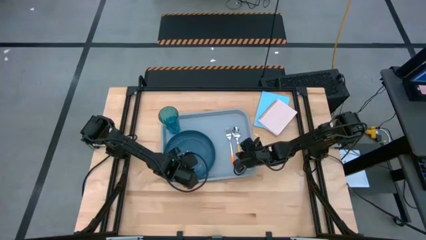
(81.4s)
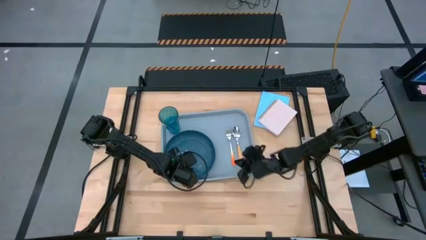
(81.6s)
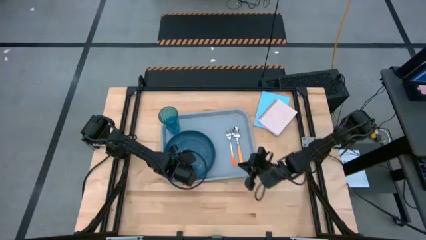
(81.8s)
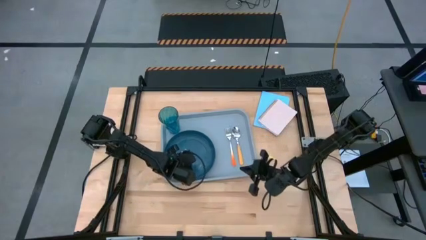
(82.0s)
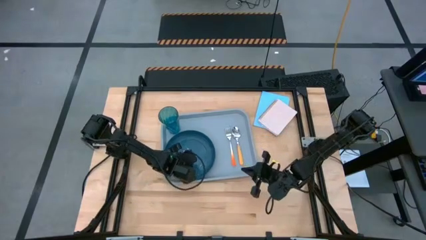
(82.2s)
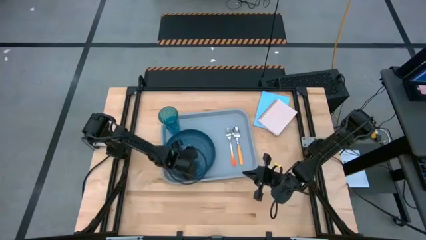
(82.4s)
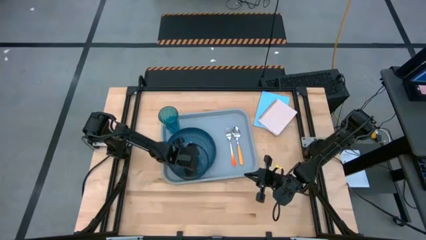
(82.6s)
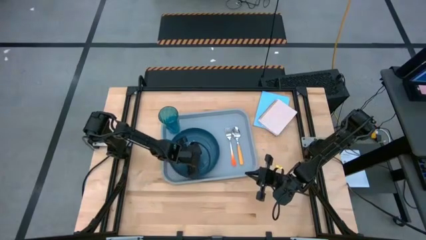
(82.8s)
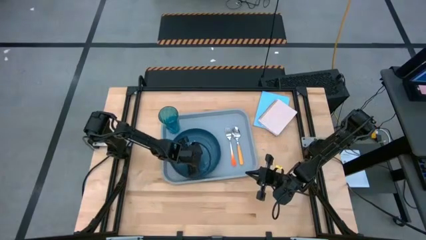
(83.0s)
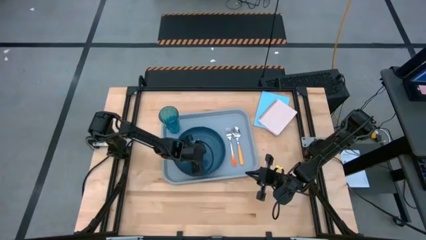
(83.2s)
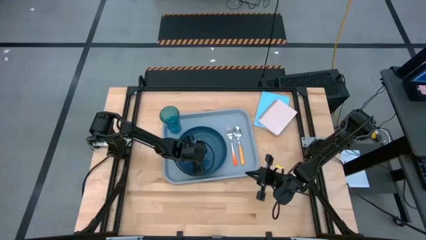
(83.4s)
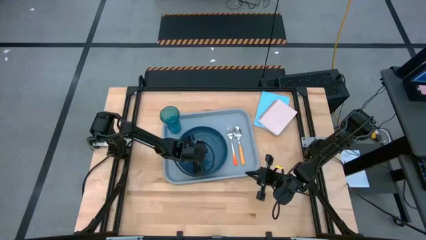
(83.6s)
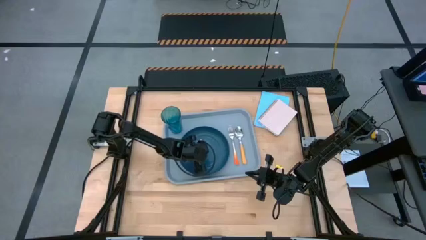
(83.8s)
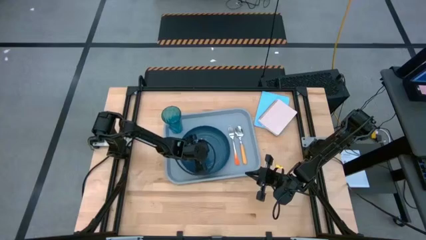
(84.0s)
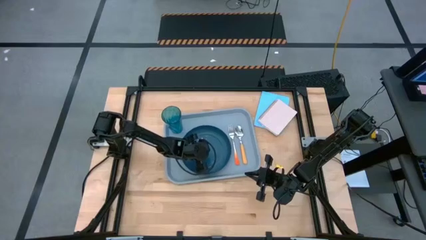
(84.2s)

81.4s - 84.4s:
Task: Pick and place plate/cup/fork/spoon on tray
Adjust the blue plate on the gray serving tray

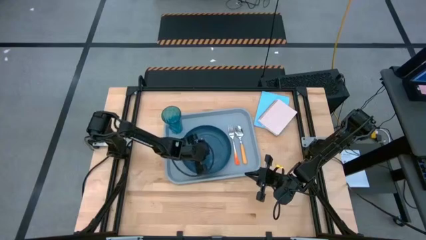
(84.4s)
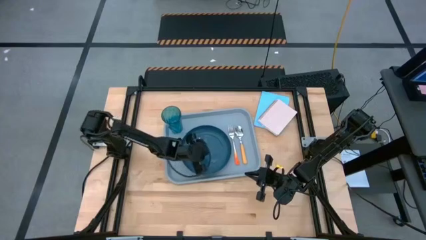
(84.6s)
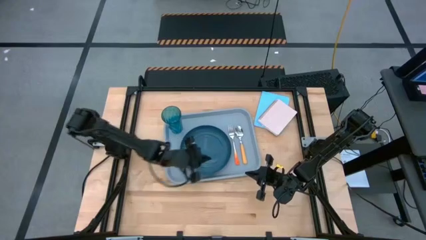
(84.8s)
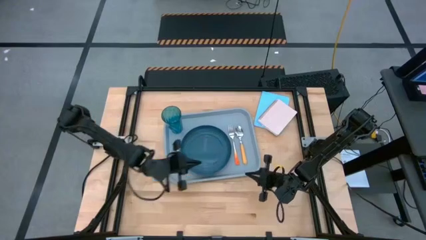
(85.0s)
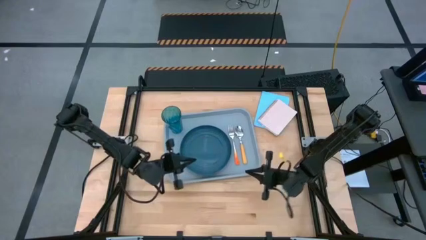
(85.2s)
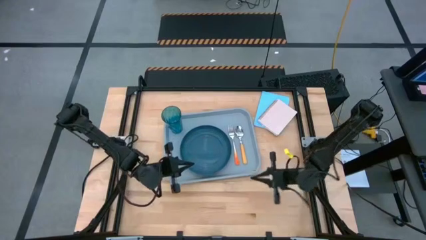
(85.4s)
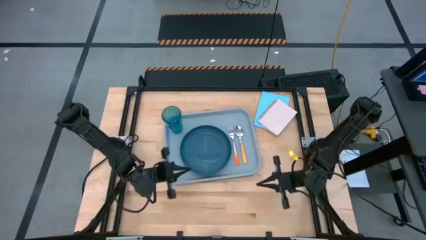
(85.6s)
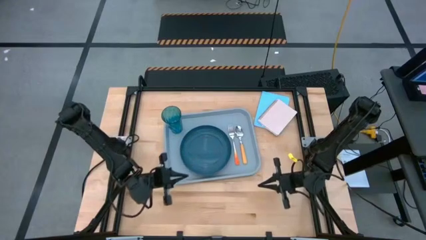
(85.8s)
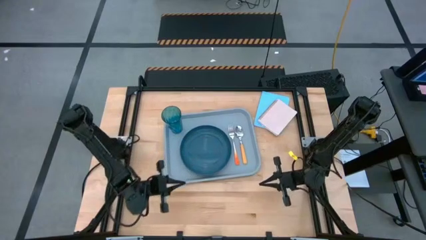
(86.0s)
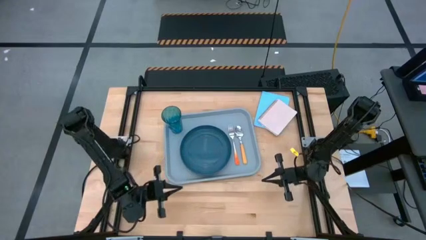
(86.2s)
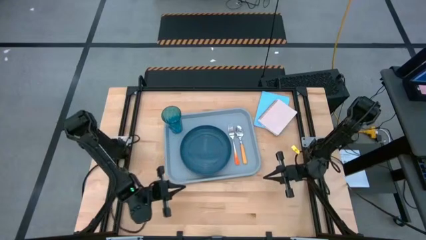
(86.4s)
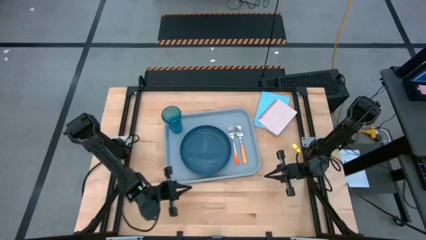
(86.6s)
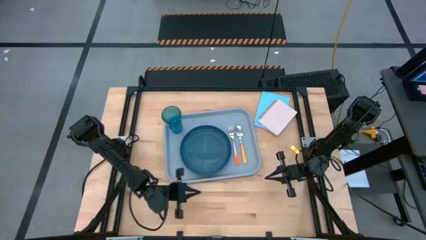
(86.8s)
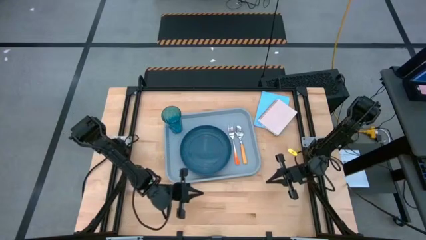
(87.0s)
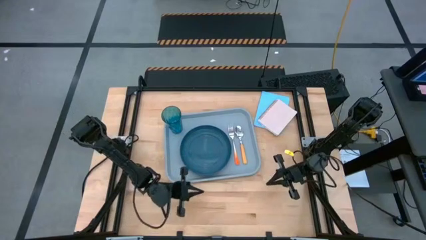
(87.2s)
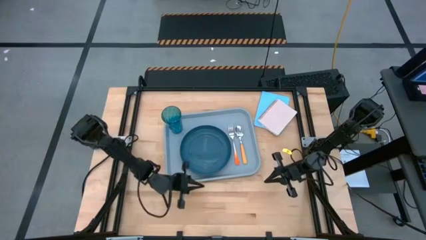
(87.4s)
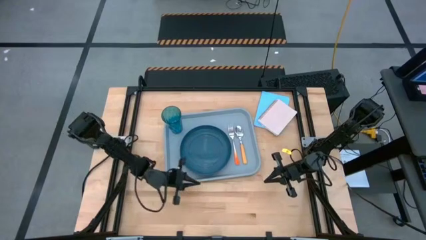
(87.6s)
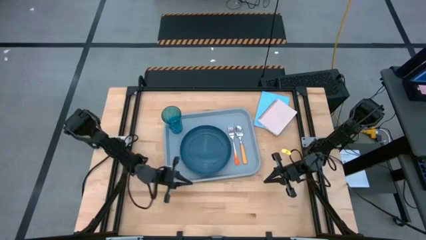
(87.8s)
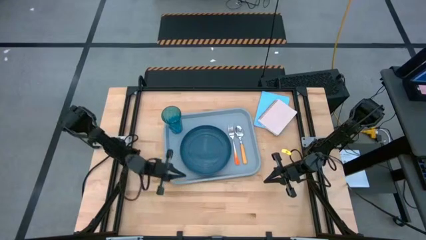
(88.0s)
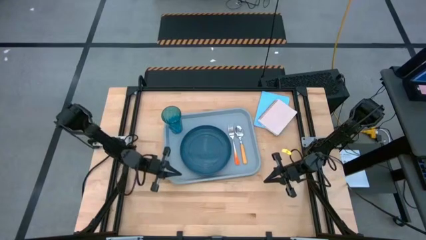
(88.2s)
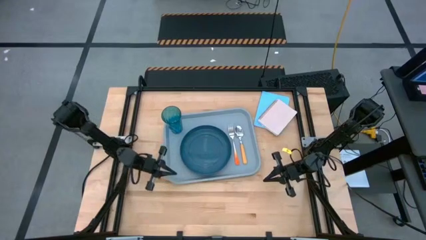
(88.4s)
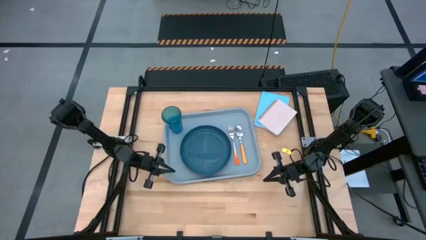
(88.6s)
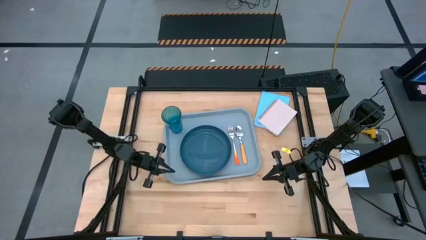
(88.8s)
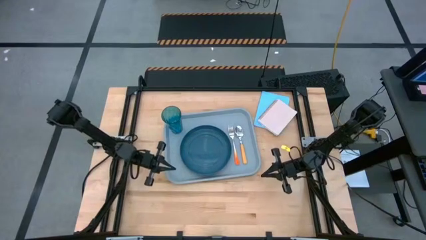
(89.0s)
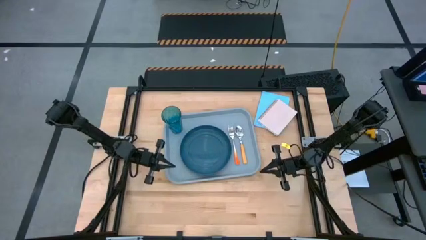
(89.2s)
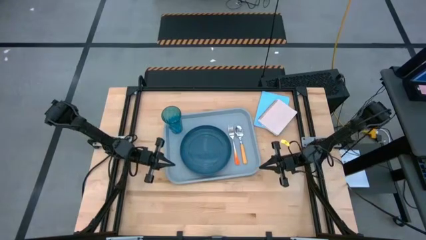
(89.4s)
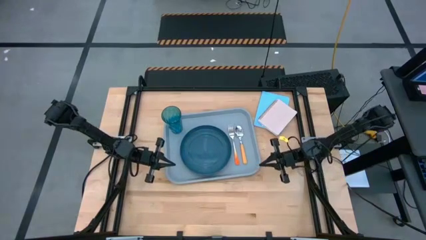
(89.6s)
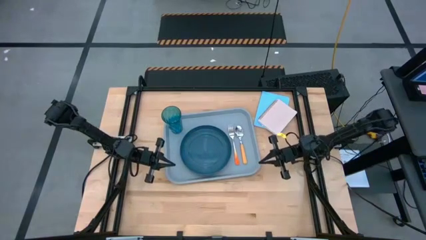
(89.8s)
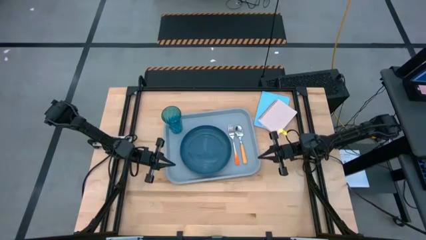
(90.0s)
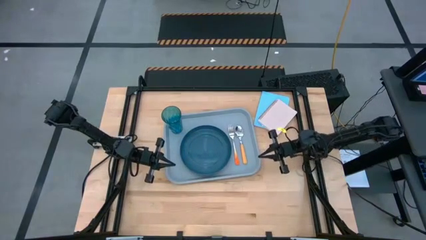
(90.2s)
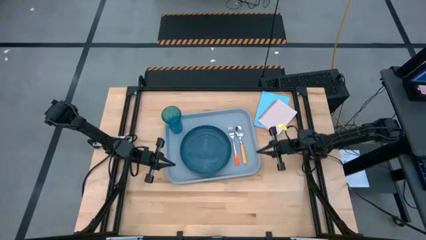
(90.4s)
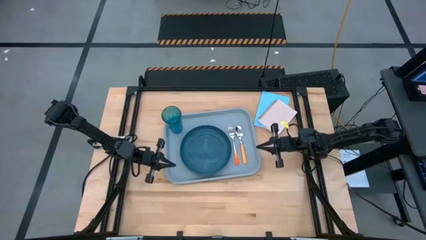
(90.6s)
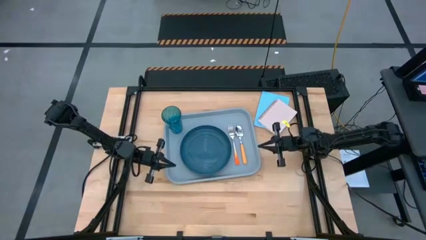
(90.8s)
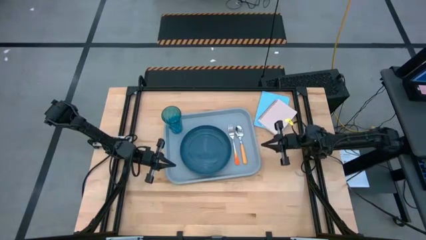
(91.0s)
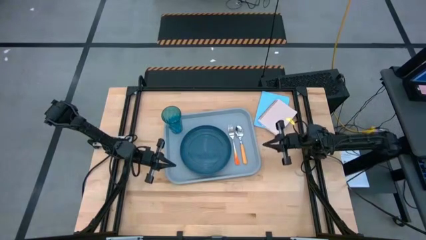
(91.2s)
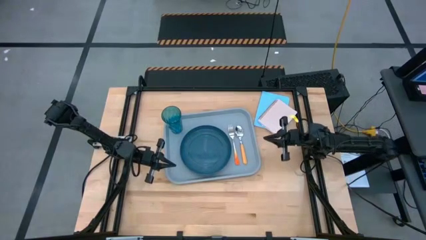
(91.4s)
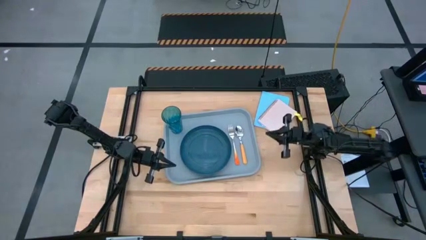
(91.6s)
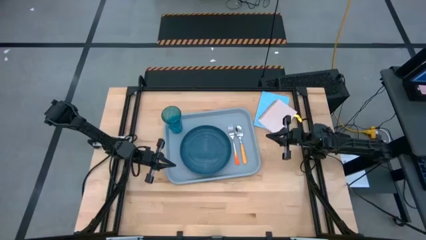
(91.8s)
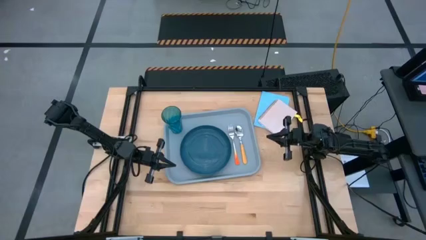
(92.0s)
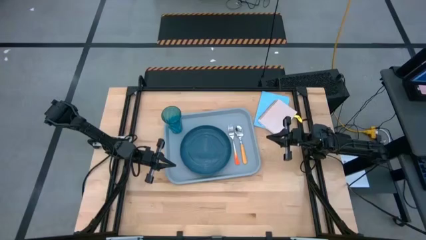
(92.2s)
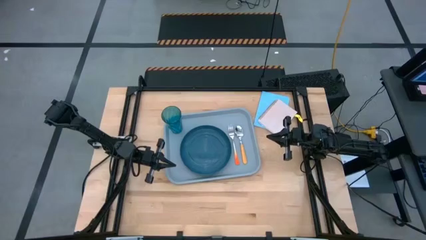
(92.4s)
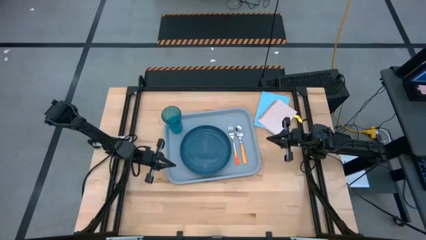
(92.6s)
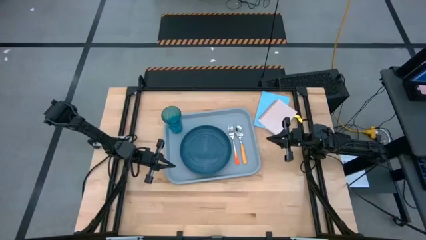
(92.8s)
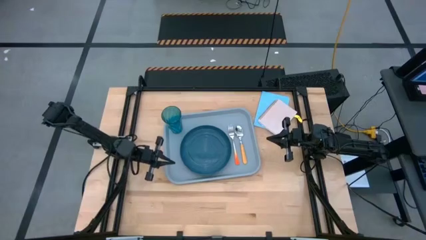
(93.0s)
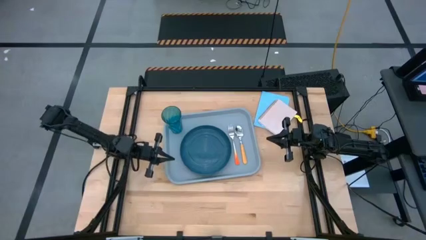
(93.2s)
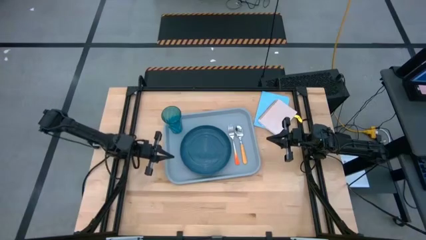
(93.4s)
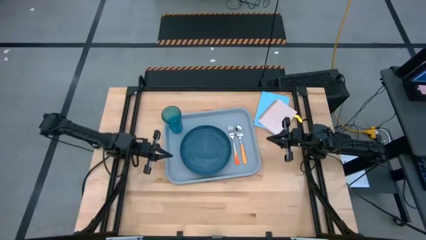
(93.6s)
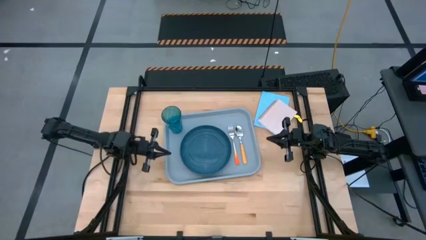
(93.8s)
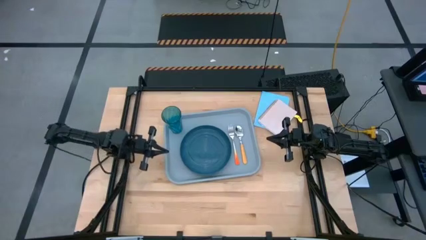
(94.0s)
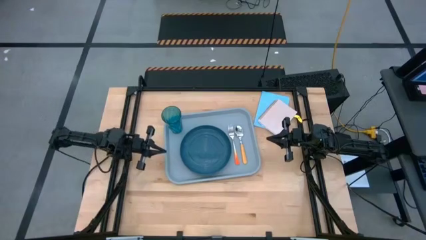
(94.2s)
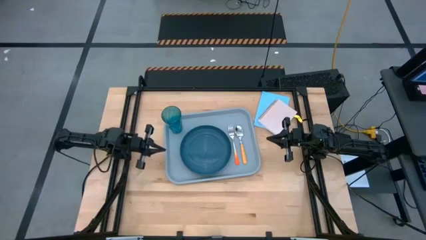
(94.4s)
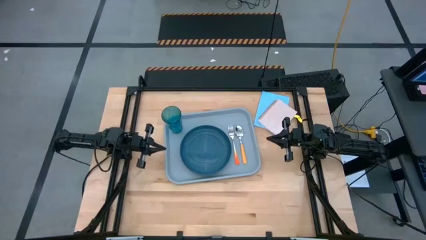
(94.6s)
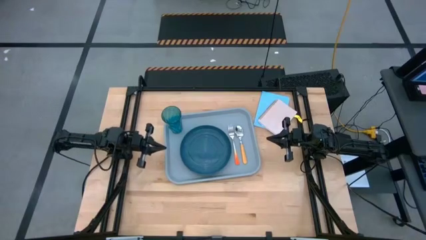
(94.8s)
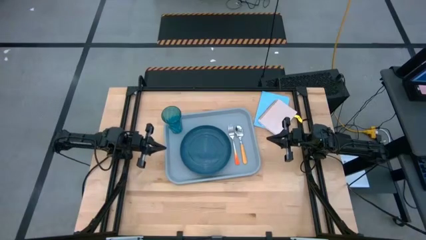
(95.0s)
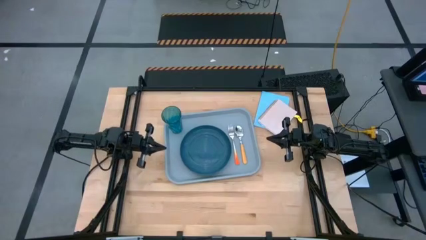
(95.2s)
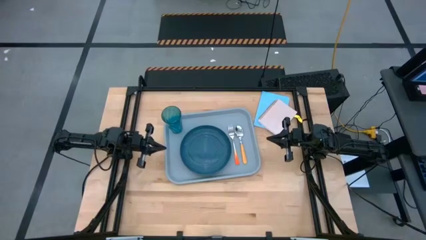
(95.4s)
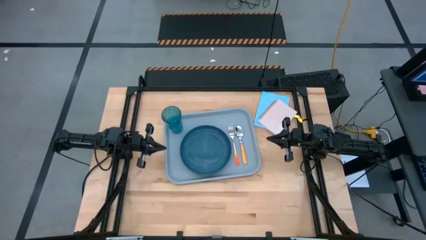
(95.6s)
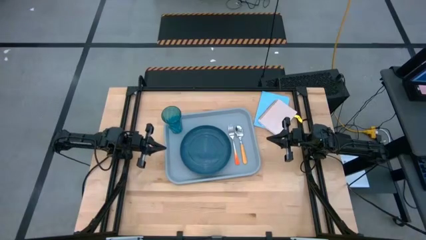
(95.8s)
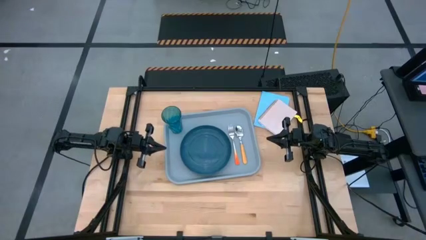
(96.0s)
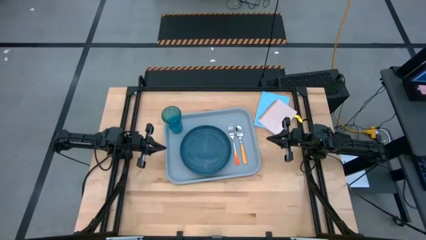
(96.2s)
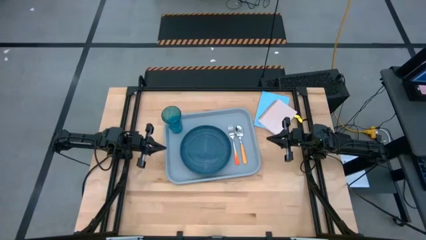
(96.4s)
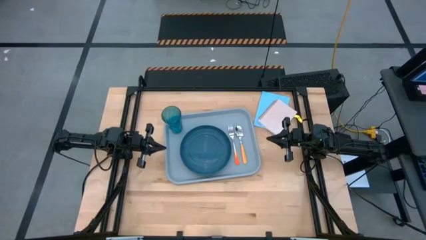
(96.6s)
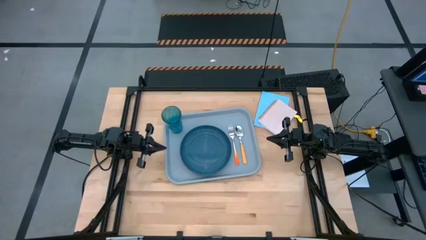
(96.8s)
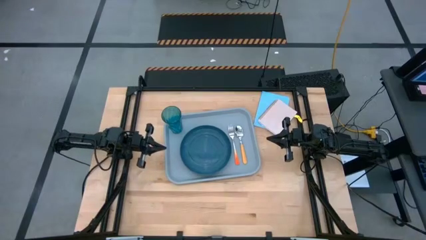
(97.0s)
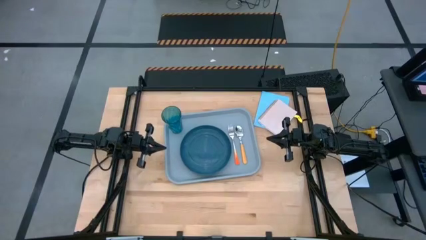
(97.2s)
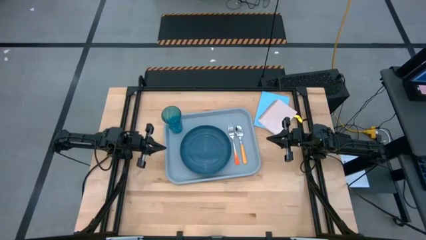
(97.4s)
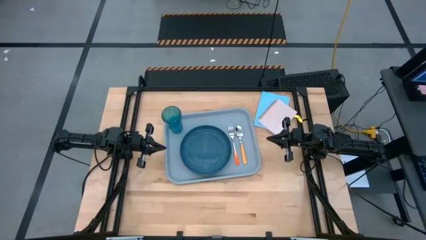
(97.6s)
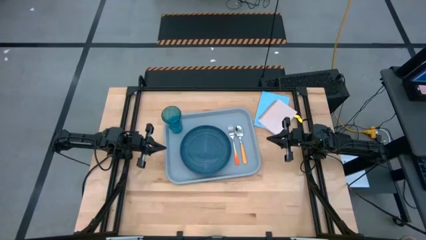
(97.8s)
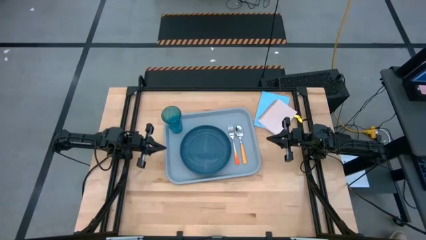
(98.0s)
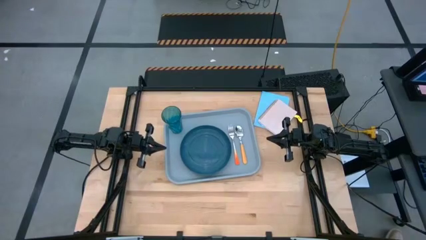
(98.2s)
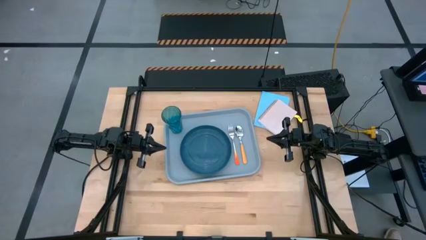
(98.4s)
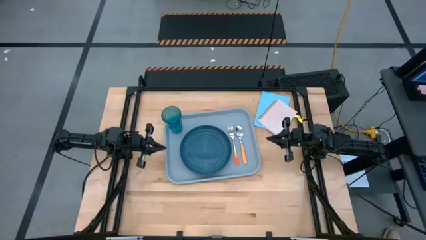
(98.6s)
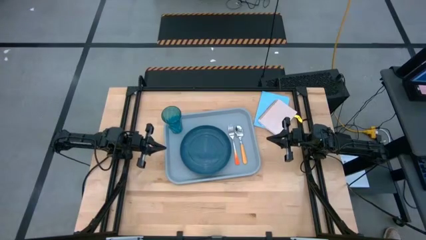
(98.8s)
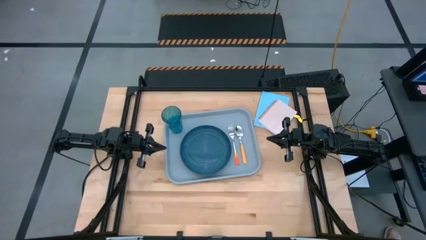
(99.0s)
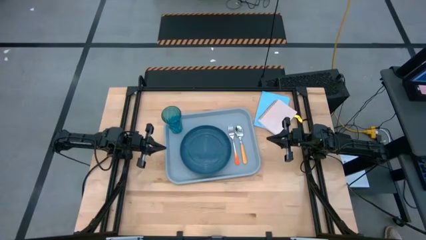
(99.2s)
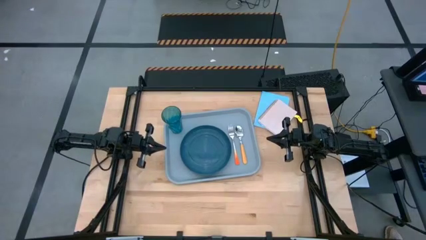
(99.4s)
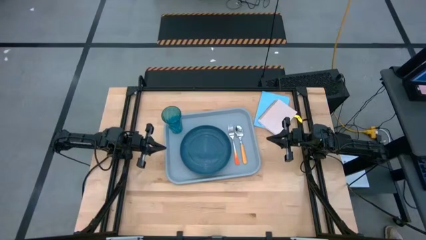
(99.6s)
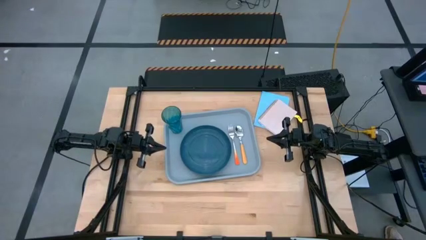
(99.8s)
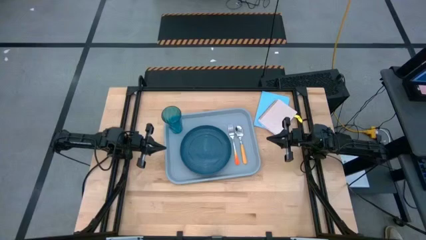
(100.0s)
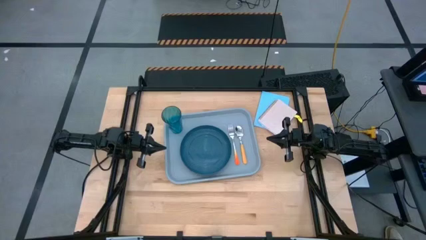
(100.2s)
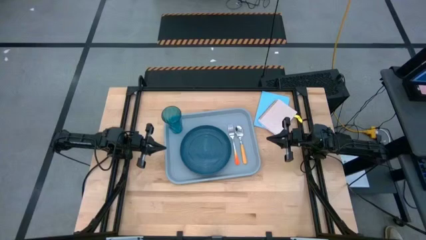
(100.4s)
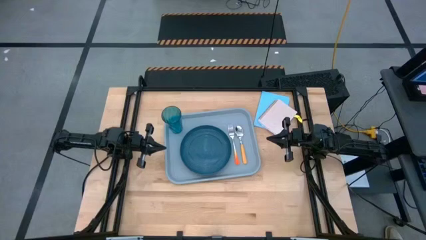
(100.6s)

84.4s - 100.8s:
Return to Home Position
